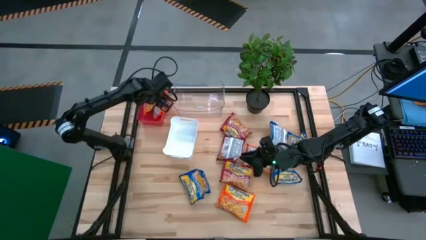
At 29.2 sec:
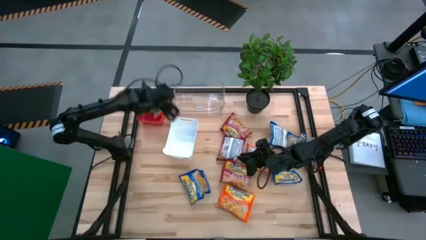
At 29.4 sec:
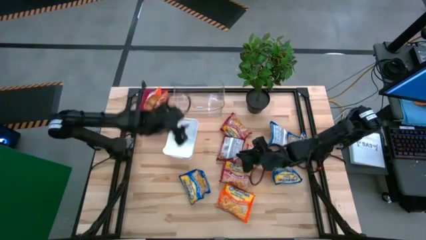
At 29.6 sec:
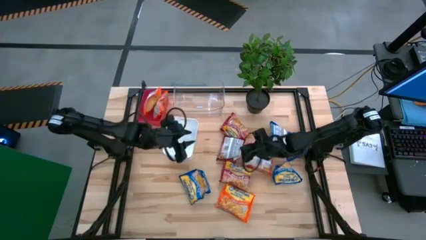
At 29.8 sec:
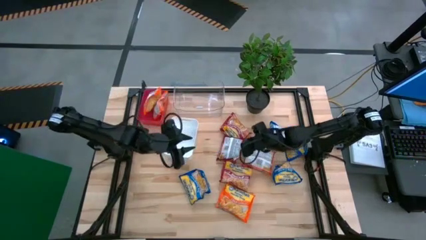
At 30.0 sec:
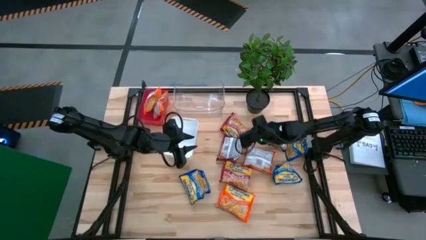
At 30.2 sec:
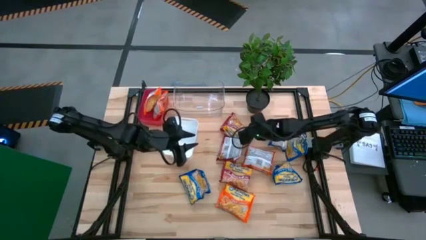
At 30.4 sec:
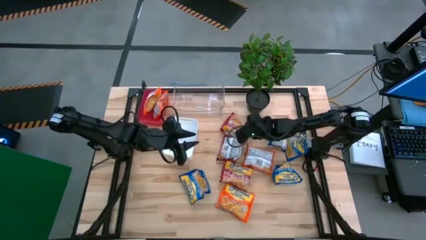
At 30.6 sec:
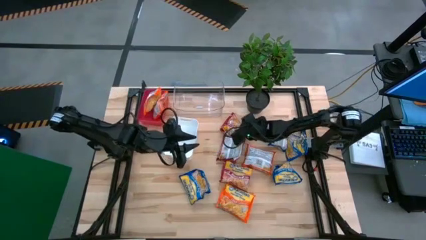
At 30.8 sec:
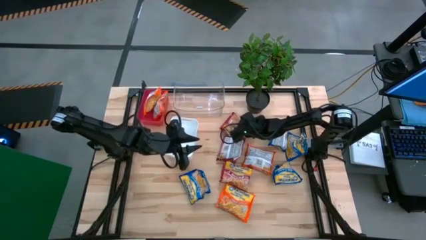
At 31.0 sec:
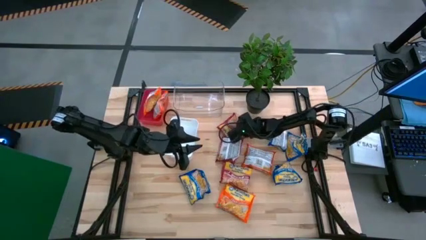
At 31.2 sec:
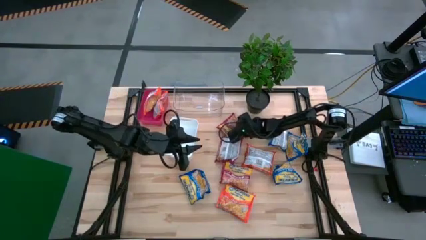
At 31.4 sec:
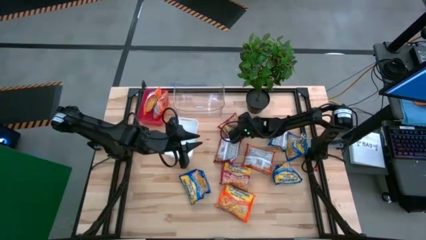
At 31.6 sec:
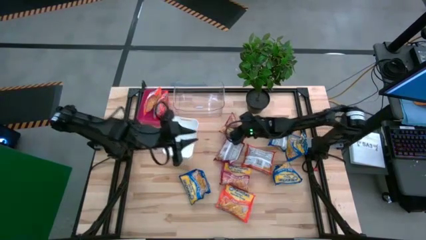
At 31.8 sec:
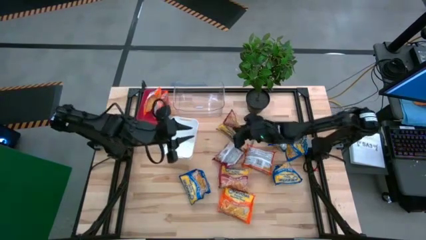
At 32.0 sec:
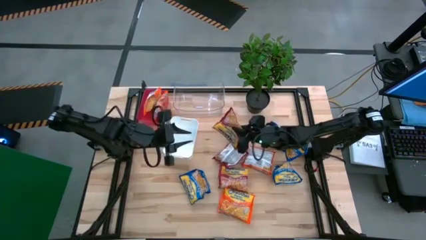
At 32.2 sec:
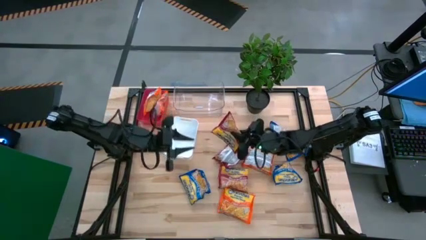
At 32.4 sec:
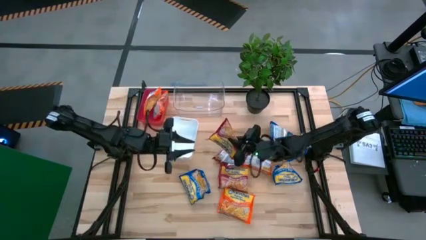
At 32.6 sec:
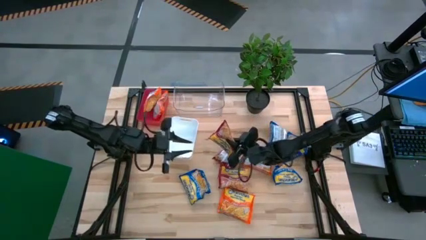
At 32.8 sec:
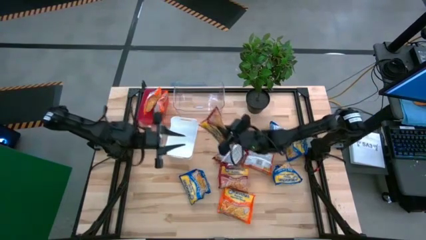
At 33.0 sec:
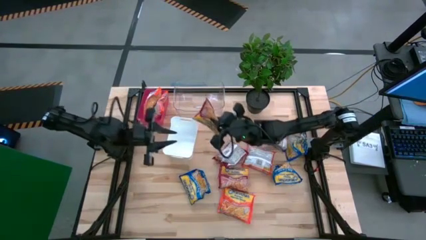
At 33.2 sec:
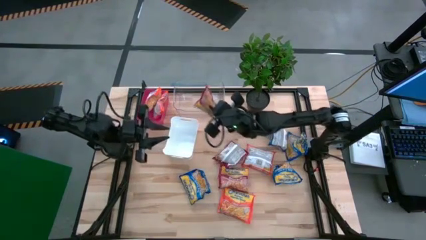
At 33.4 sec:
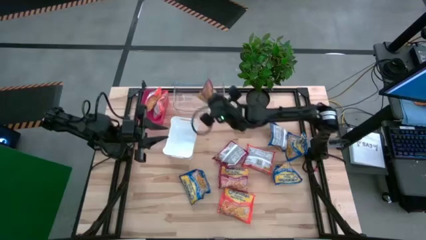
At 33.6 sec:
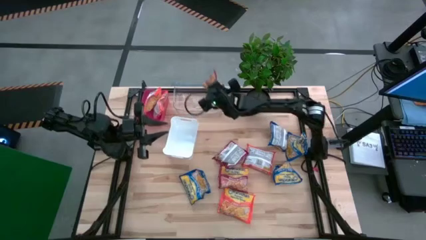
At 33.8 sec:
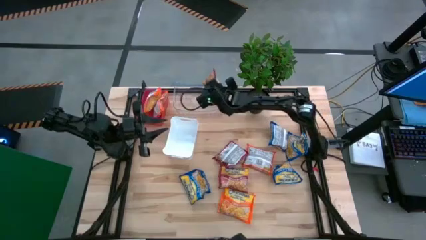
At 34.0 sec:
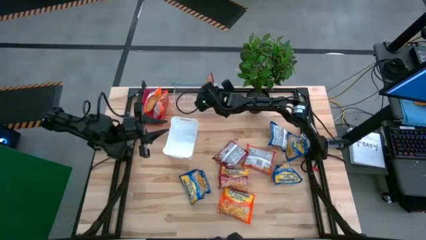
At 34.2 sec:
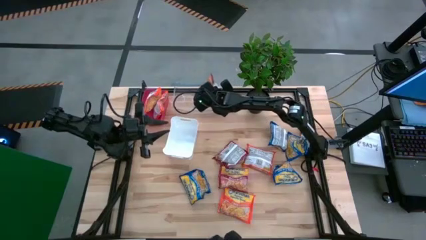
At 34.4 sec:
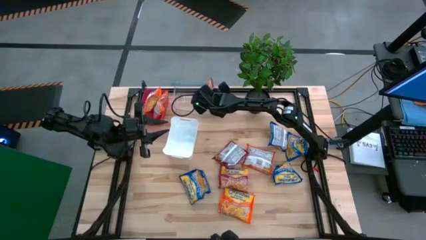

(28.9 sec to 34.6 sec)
Task: Sort Maruchan noodles
Put the red noodle pack into the transparent bin

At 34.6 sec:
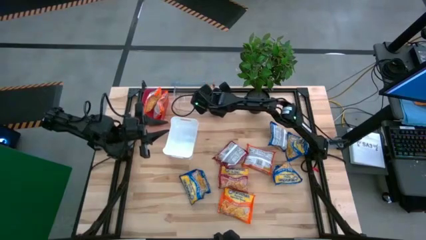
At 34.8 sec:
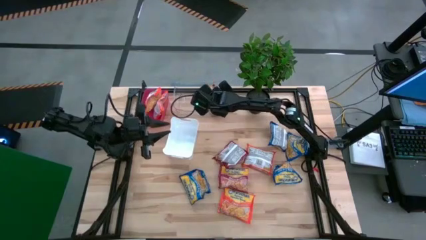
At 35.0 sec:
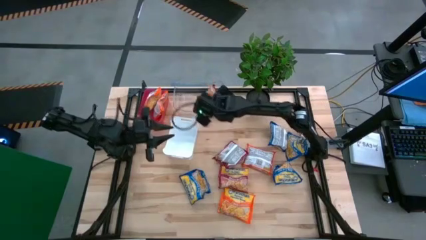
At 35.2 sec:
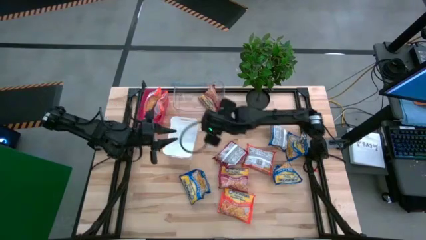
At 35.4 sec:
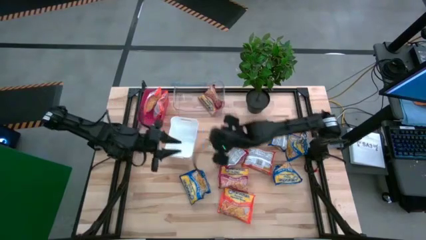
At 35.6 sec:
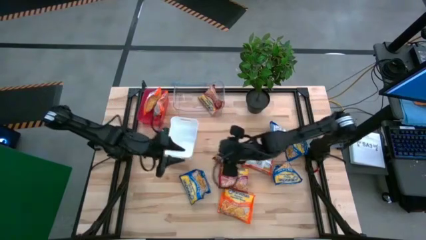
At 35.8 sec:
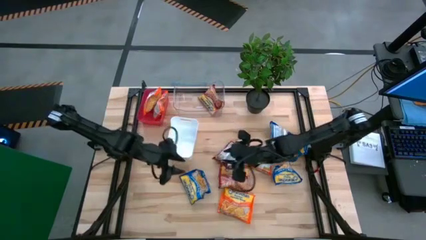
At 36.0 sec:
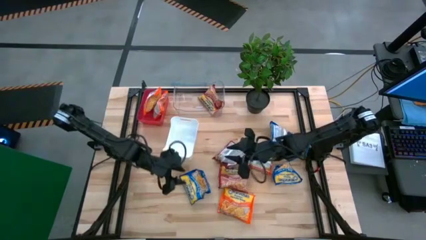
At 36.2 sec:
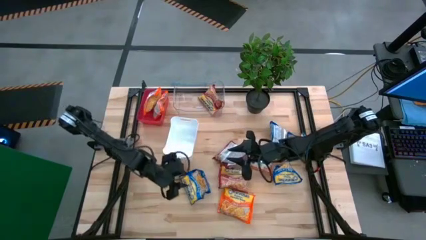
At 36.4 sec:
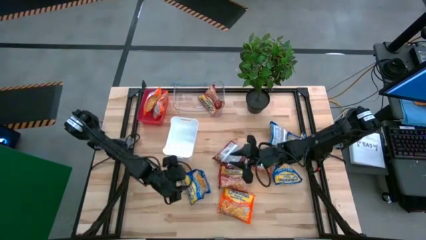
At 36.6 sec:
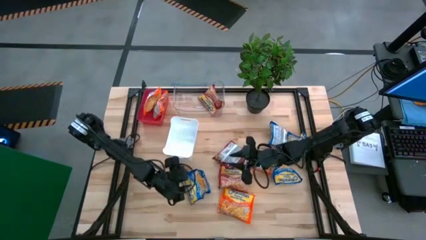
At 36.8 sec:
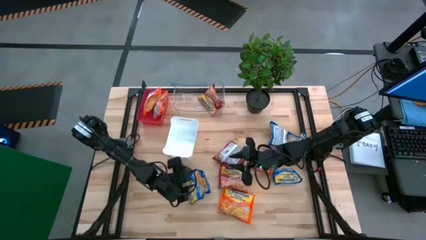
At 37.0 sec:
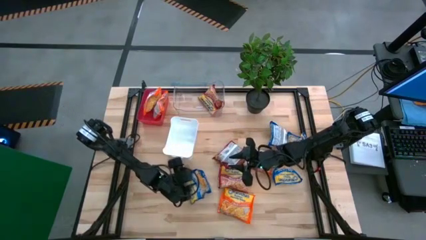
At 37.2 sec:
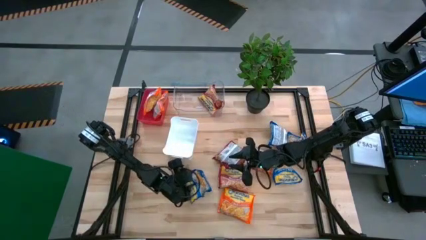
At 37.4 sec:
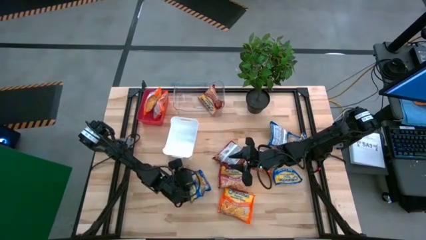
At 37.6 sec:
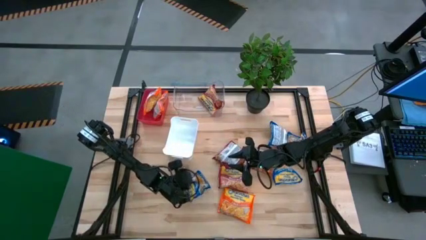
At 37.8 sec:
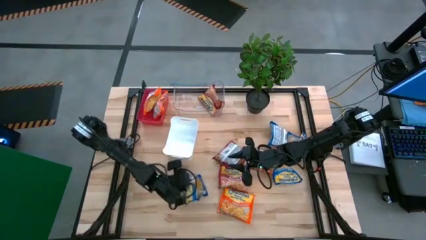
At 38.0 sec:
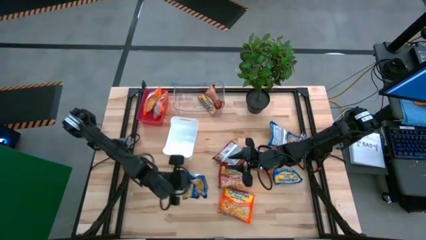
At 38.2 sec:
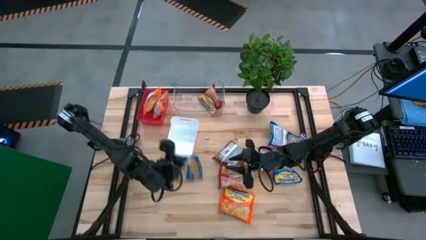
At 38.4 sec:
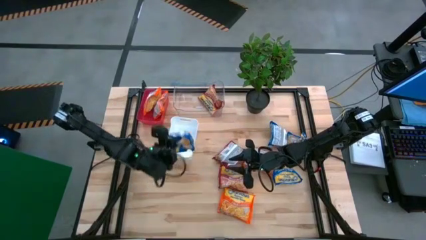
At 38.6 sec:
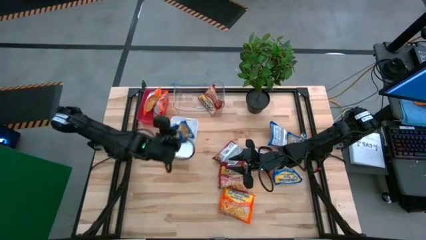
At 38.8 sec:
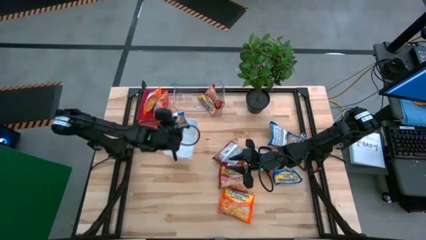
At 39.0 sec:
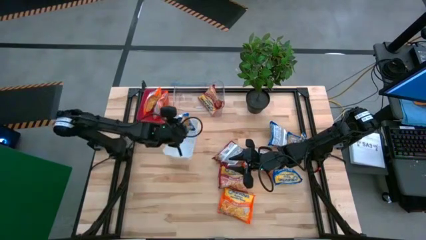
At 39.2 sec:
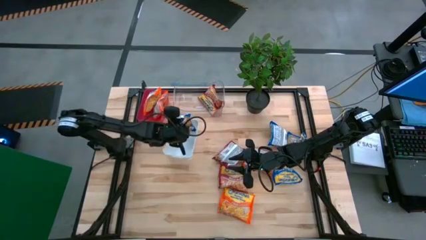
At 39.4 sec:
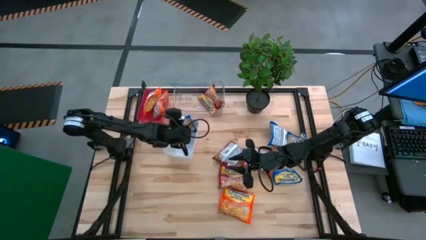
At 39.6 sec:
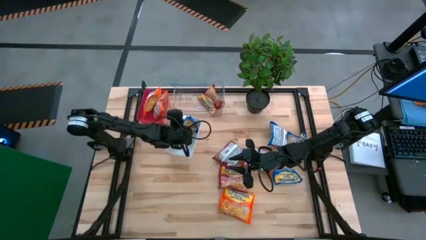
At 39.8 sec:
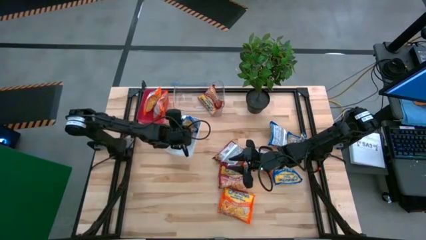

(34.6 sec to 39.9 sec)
Put the blue noodle pack into the white bin

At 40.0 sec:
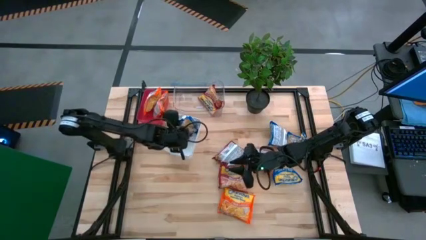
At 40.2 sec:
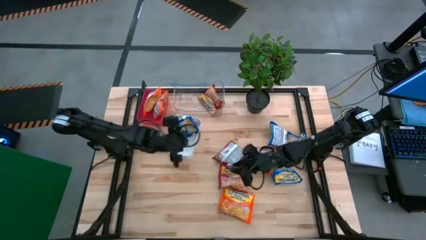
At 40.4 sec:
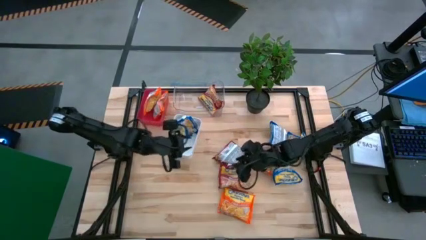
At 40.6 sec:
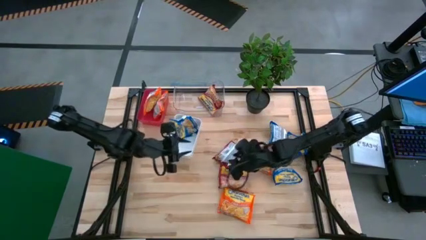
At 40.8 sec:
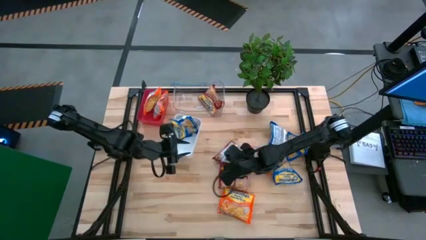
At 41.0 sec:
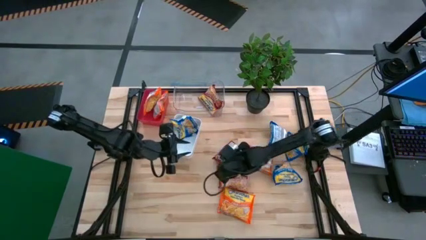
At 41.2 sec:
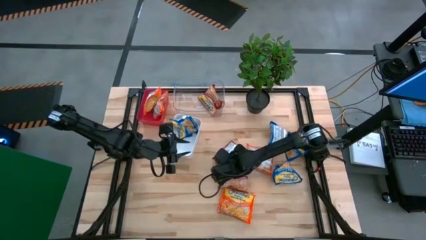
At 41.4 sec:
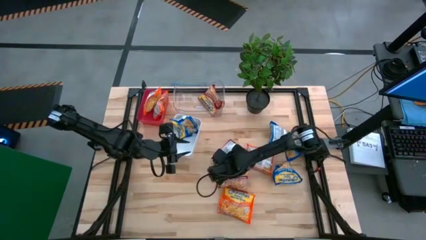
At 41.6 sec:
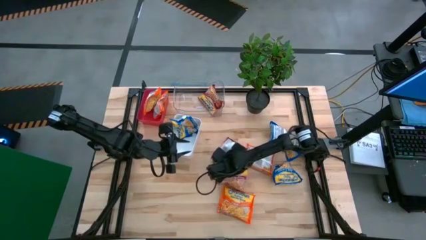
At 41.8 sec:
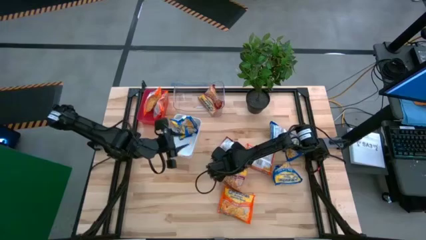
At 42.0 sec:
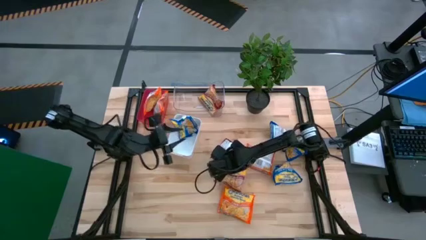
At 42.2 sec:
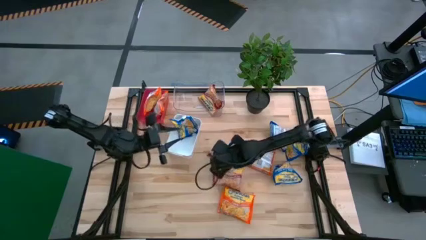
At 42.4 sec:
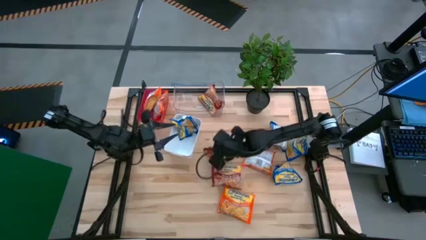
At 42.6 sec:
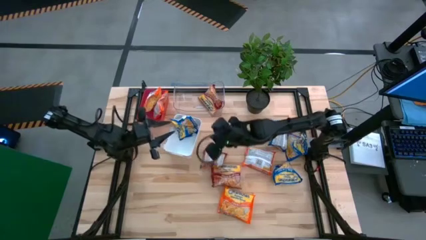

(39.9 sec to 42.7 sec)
Put the red noodle pack into the transparent bin

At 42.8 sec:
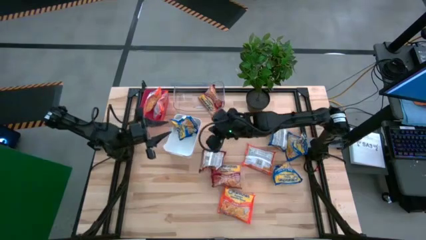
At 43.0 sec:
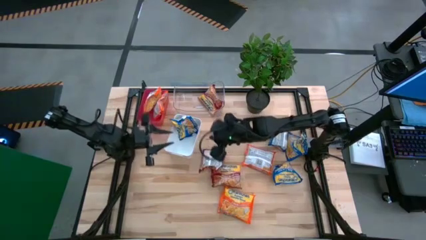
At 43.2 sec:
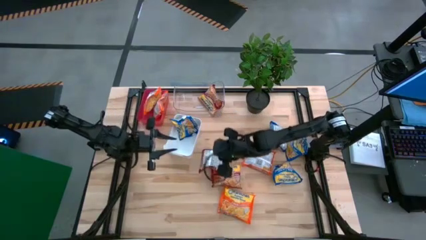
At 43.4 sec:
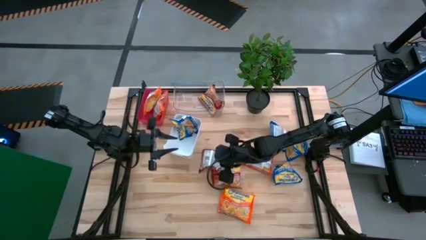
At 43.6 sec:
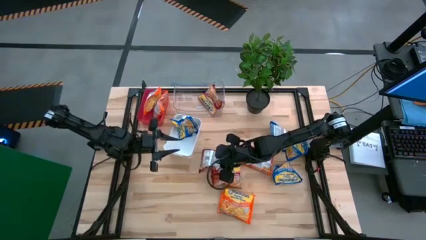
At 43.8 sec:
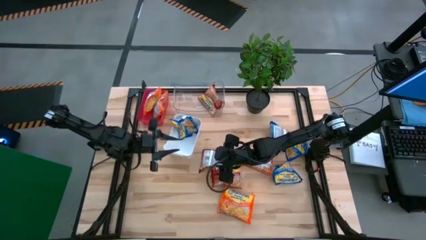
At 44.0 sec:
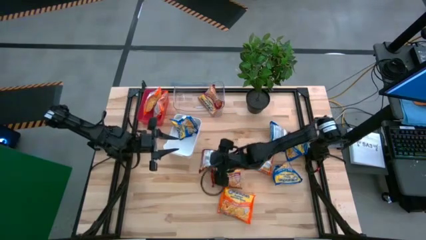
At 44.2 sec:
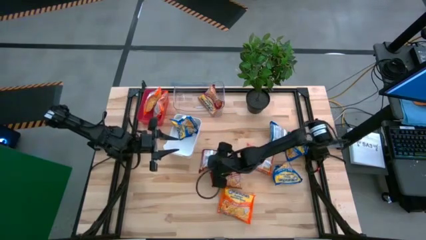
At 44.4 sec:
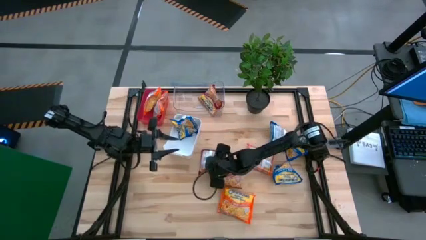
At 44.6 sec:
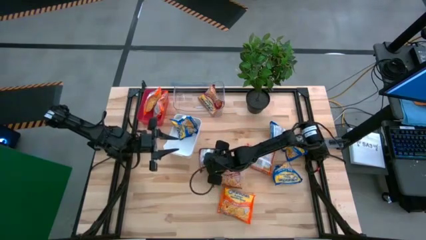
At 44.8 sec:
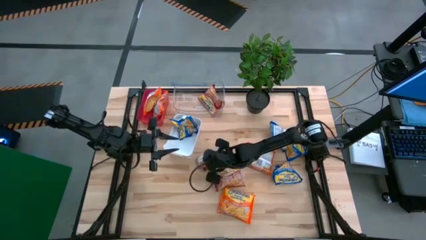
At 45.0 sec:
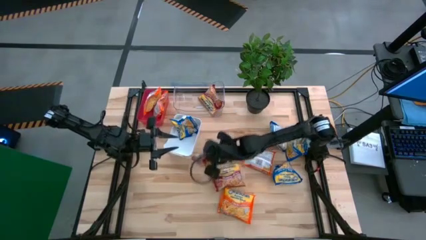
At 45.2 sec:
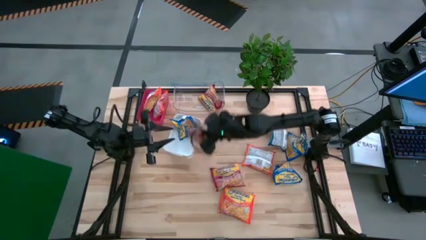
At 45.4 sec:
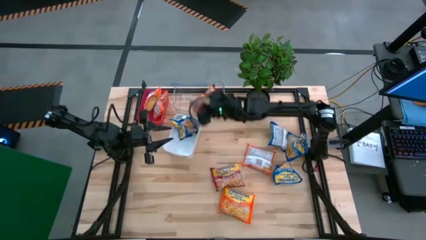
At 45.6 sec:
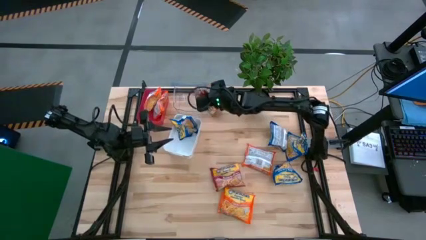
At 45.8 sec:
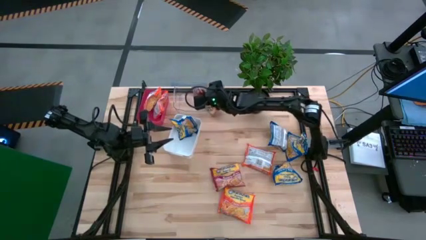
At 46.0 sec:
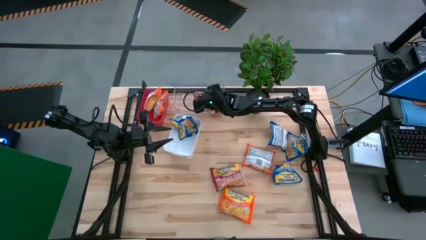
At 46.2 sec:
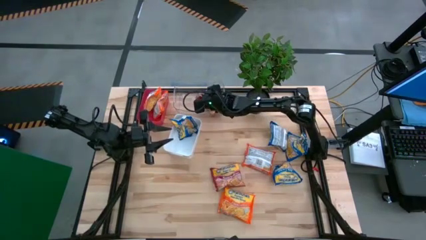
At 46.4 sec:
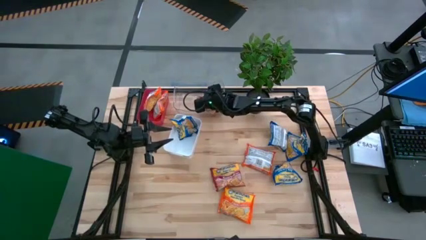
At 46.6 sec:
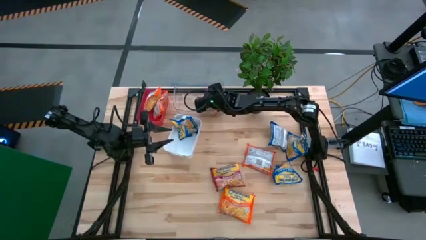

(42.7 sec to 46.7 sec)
Put the red noodle pack into the transparent bin
